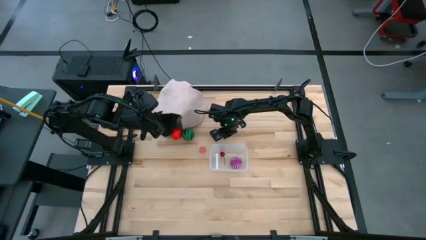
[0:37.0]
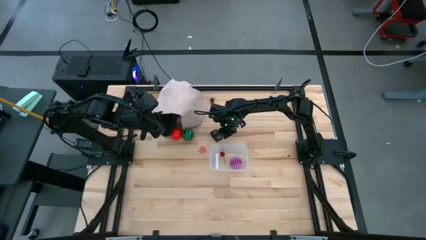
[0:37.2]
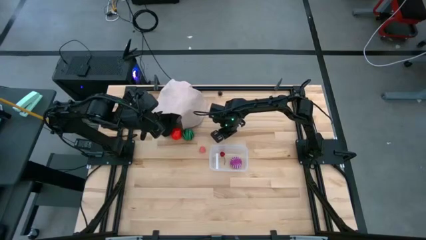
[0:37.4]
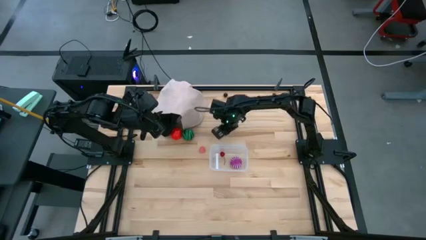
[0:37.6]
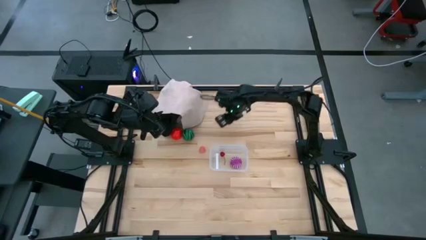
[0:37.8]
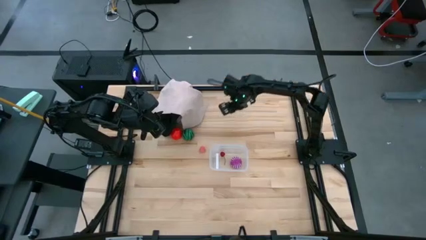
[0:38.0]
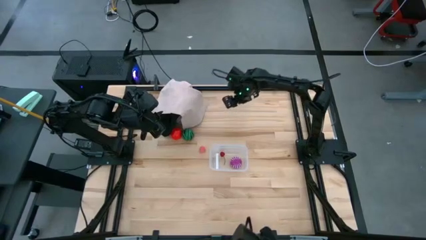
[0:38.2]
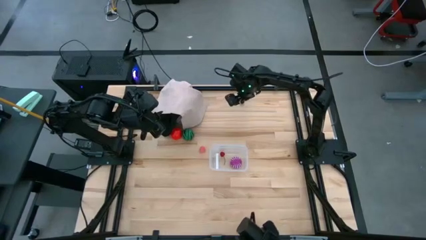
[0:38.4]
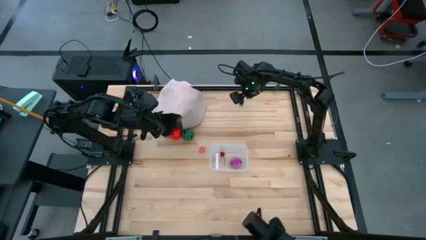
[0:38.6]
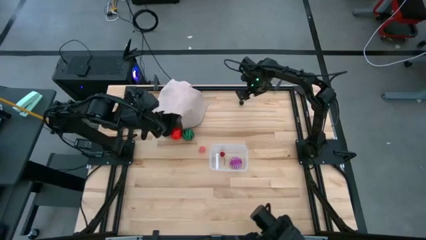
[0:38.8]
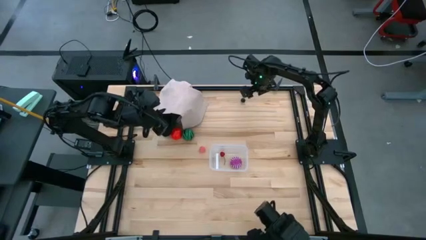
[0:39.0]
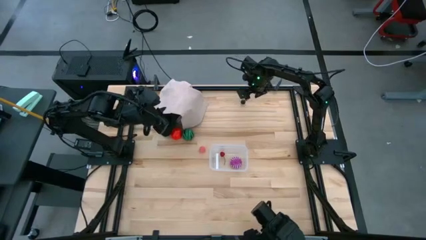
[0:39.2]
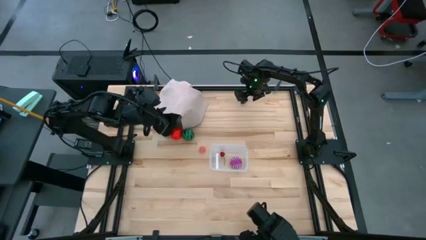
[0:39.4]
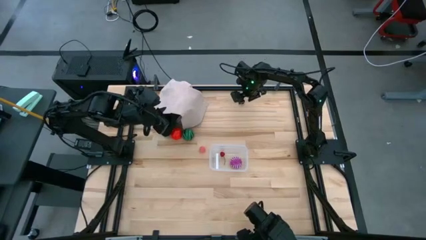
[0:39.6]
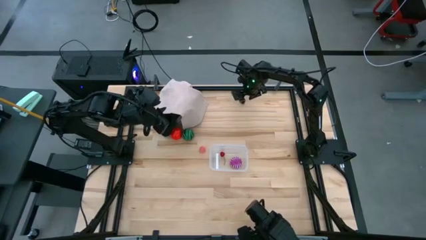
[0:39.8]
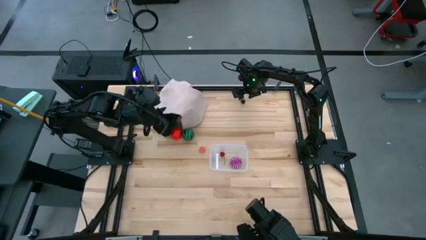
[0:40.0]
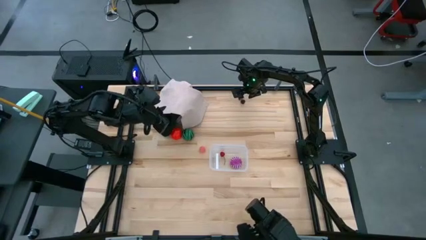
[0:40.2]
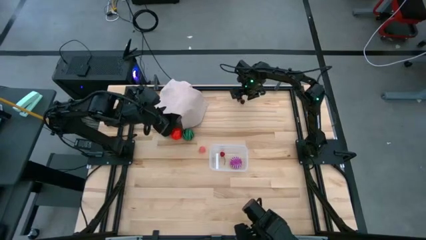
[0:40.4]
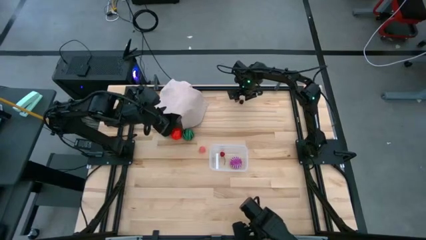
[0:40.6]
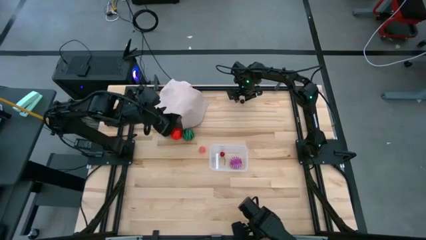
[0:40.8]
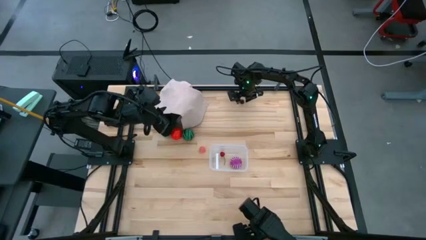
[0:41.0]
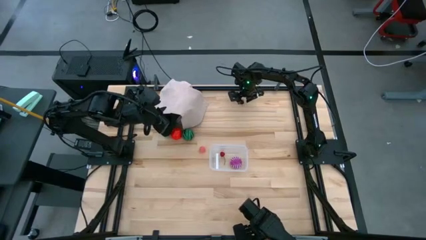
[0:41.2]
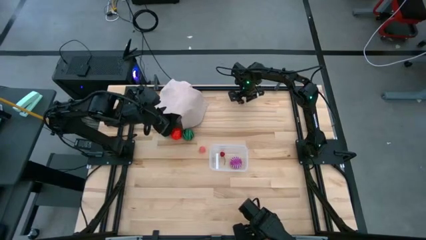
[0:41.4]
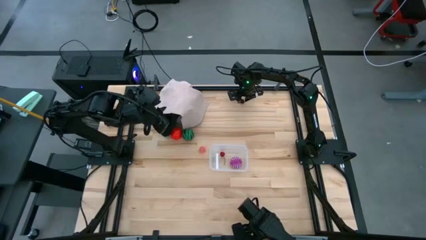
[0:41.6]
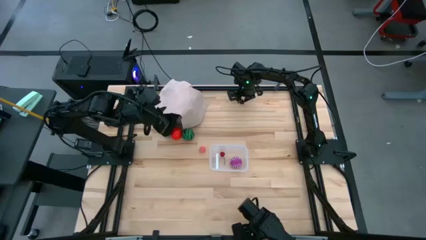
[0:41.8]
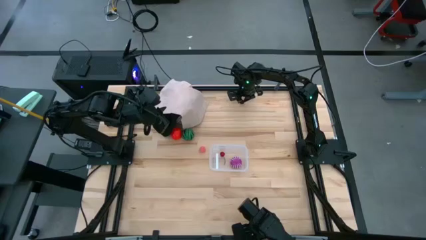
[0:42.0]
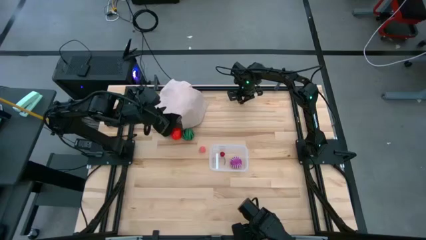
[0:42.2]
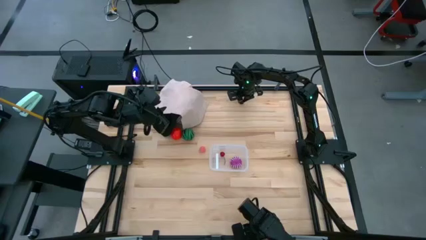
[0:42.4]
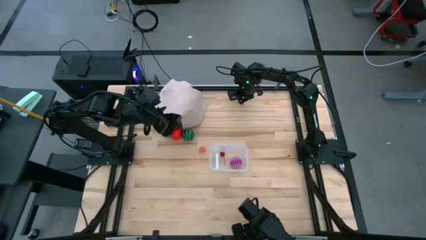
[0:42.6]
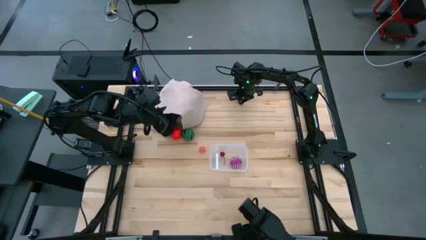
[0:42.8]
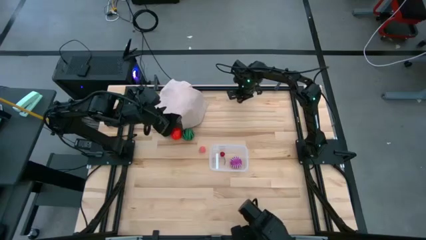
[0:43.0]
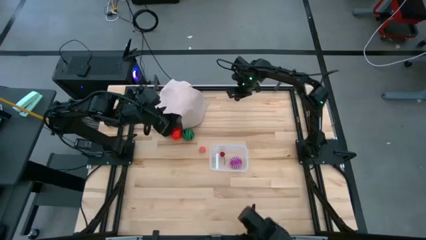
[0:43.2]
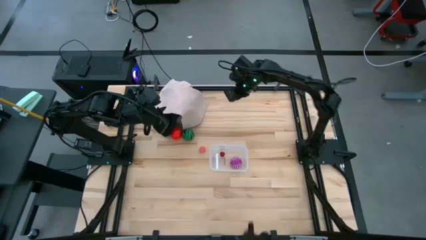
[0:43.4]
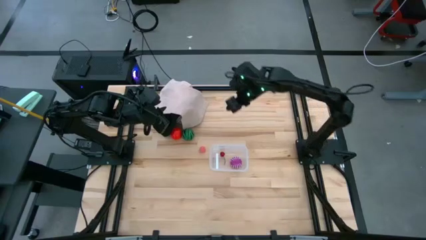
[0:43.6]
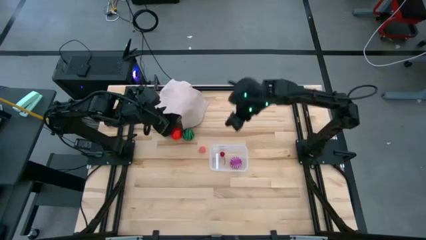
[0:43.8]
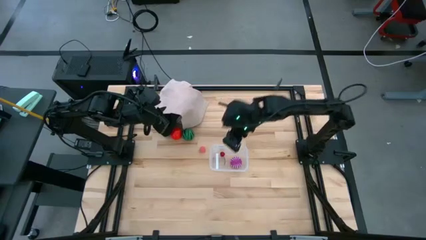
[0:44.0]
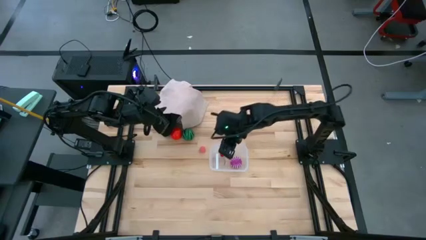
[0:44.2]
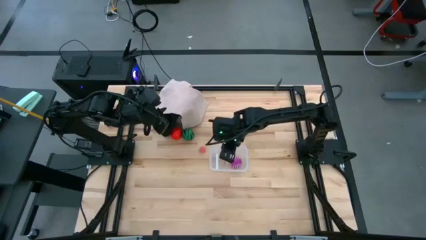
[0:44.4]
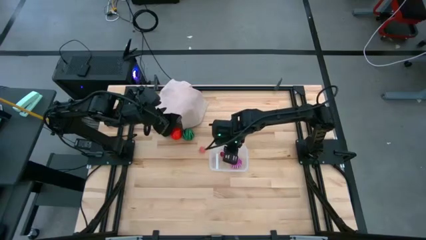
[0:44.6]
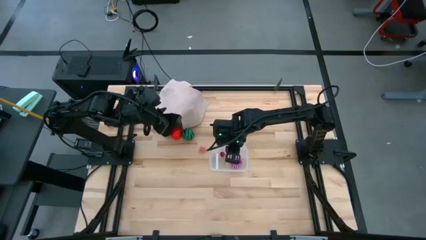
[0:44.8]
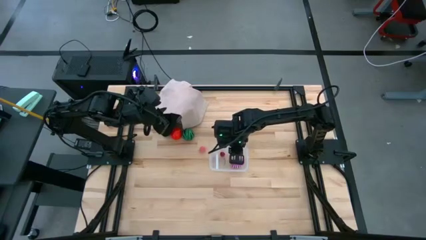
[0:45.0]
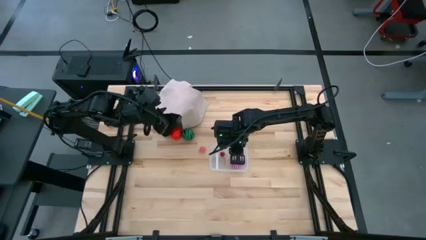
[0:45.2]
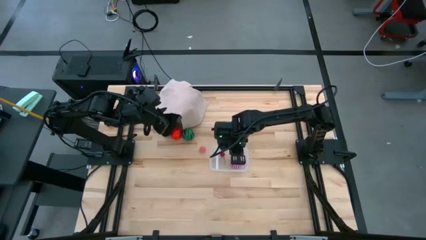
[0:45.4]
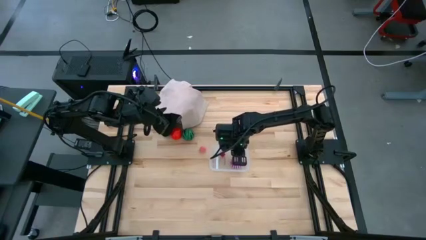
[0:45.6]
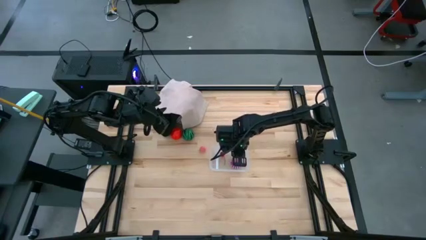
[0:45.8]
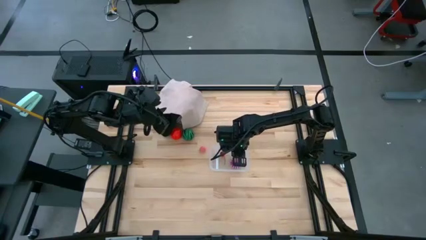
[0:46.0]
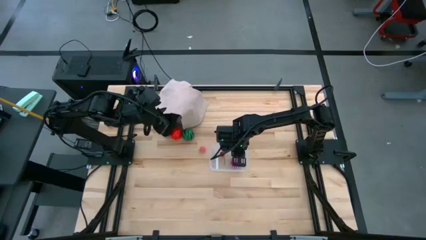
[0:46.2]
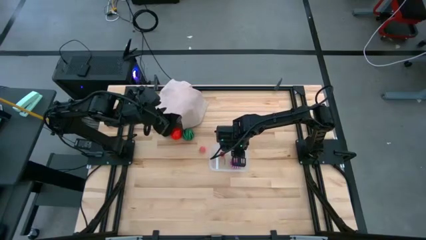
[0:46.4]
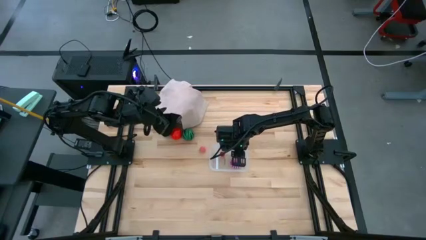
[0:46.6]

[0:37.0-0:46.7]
Task: Pick and placing Produce into tupperware
Put the plum into the transparent bin
